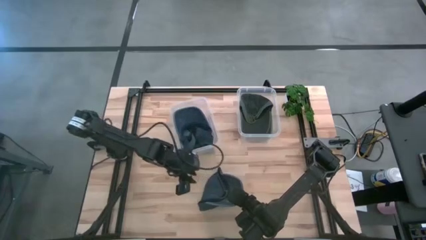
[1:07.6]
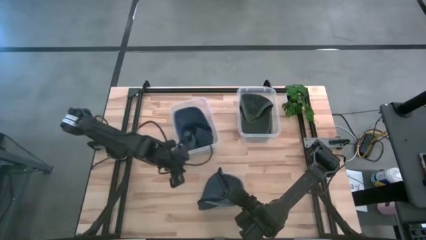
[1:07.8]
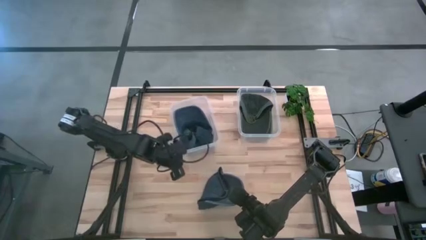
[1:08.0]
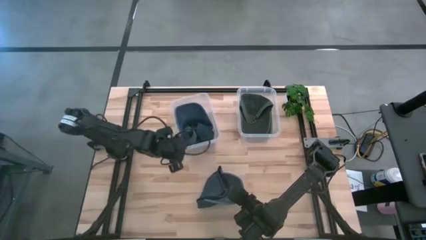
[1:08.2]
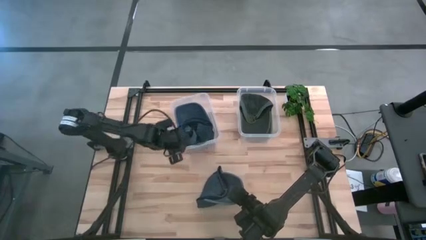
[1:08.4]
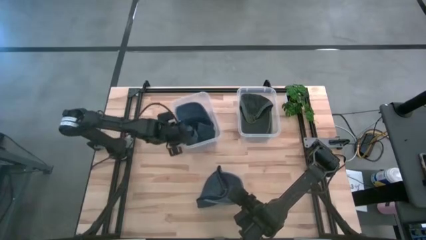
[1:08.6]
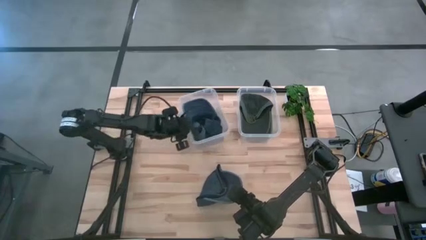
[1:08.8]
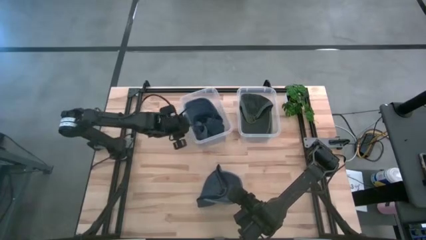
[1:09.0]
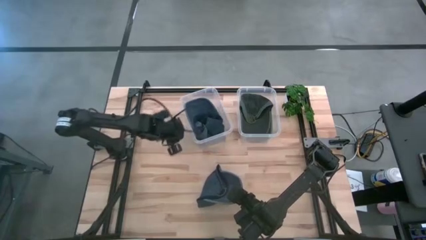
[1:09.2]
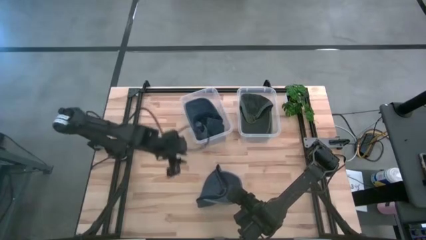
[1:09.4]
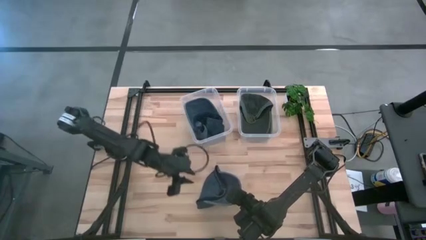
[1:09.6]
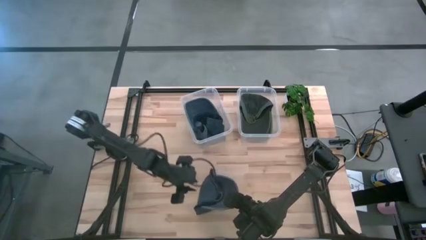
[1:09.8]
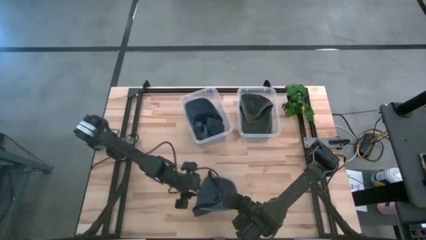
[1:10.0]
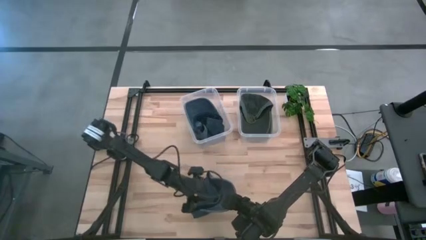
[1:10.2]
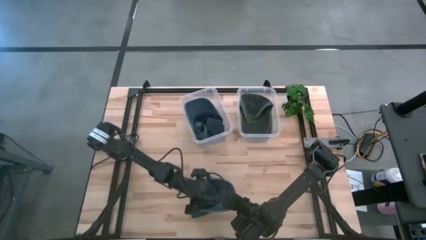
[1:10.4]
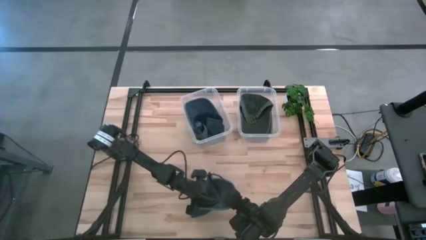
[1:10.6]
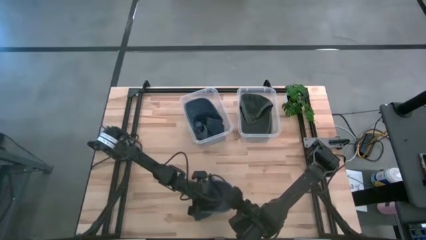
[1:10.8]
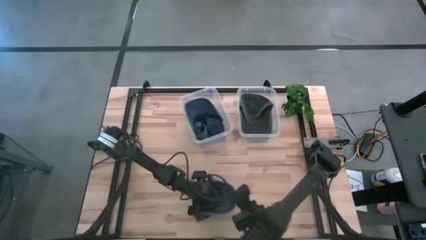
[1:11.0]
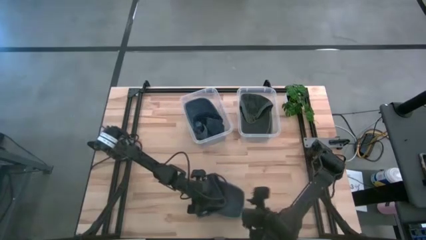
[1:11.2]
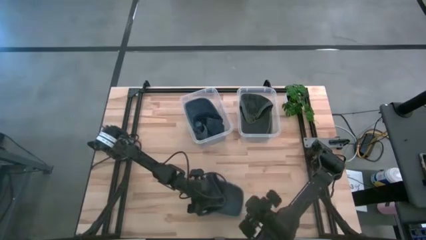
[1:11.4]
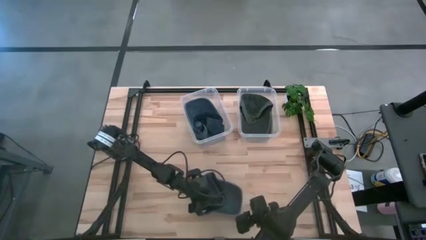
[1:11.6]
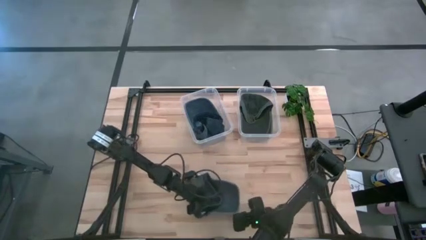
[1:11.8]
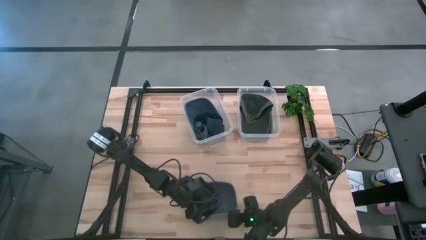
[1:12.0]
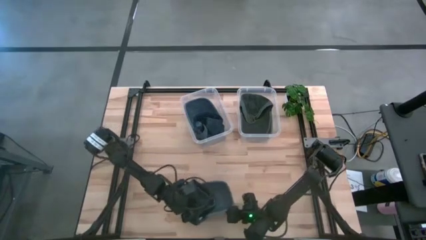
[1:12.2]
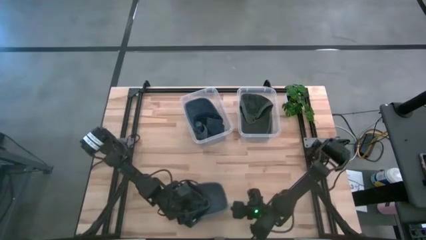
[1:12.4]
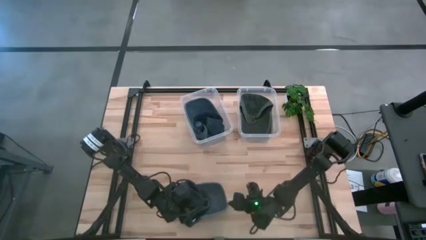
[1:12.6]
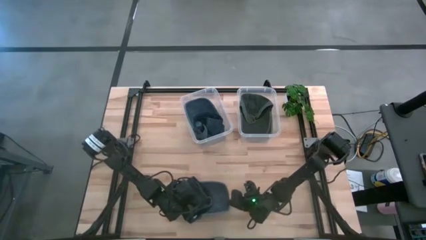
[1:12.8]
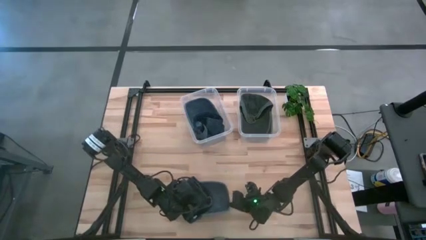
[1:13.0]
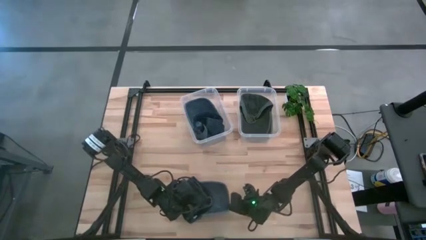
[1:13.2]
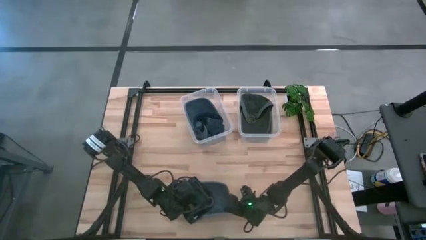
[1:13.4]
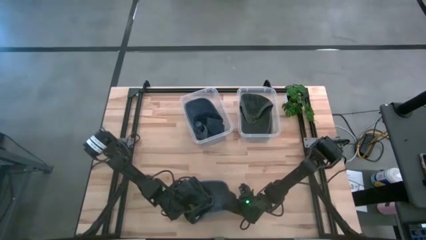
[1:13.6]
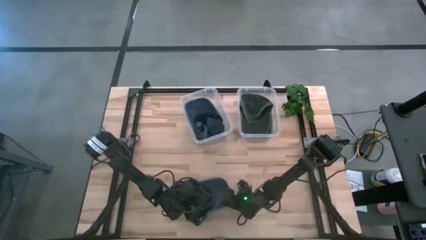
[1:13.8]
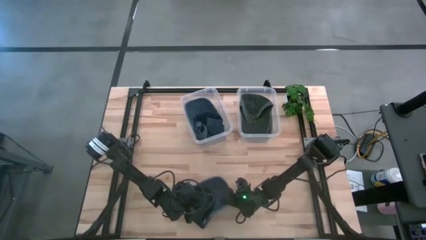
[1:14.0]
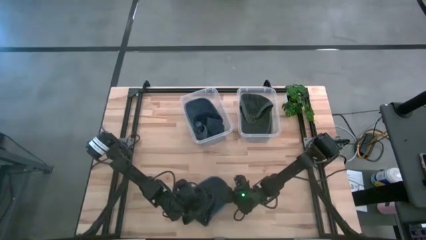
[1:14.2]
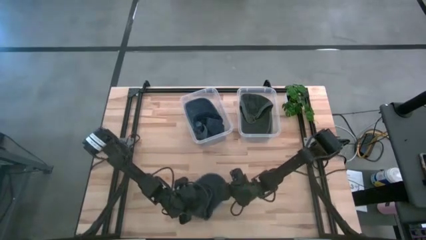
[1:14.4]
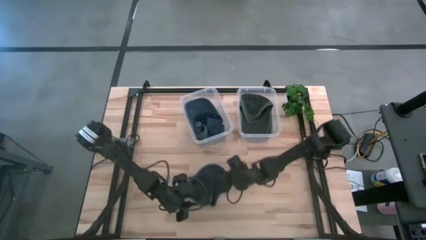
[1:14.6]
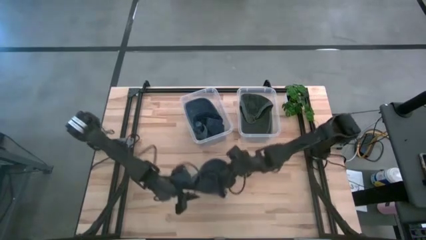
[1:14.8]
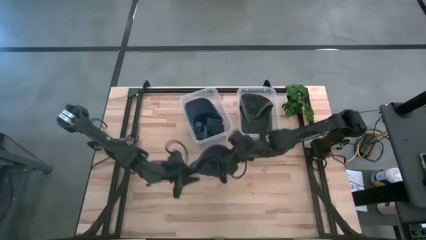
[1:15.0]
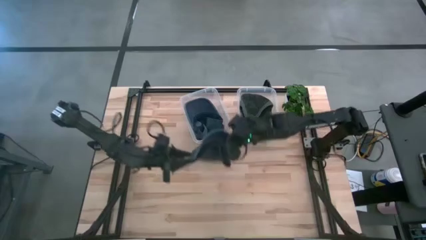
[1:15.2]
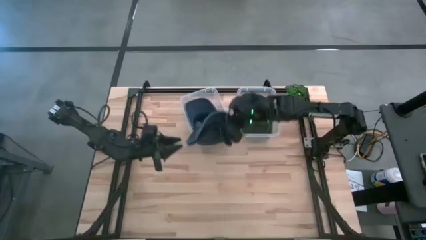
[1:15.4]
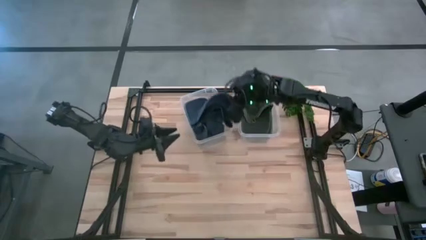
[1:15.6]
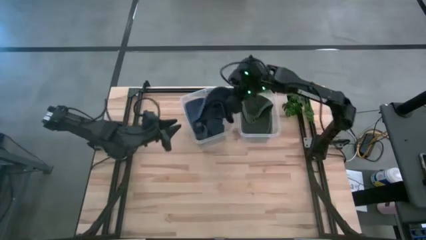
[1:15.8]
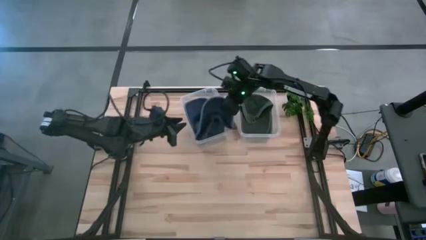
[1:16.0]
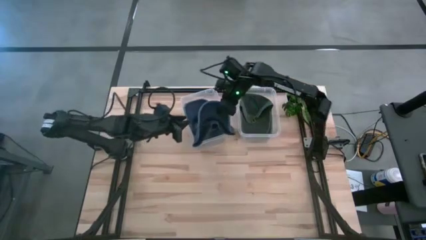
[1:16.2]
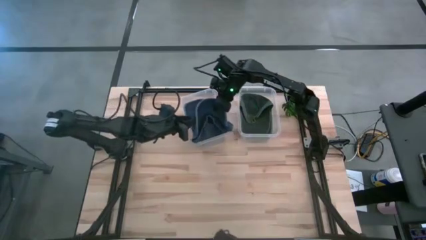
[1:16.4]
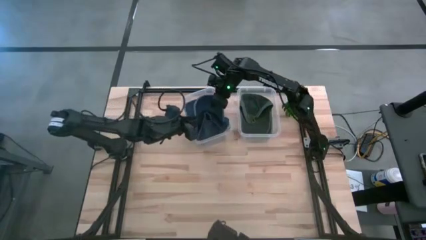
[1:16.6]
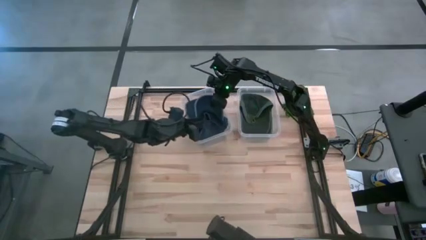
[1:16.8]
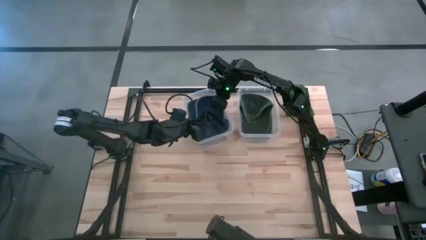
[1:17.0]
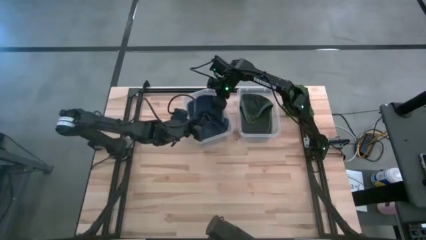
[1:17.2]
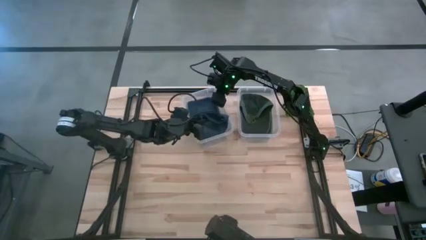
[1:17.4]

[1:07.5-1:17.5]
Task: Pick & Place hat
Put the blue cap into the left transparent bin

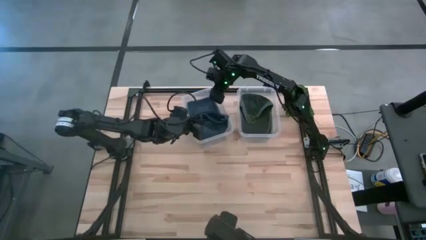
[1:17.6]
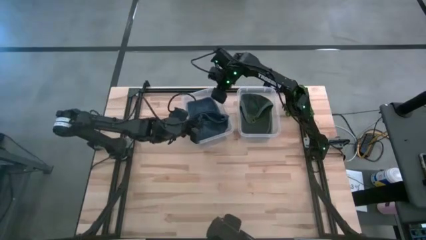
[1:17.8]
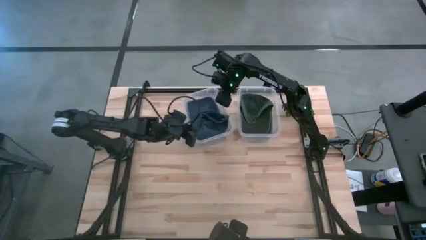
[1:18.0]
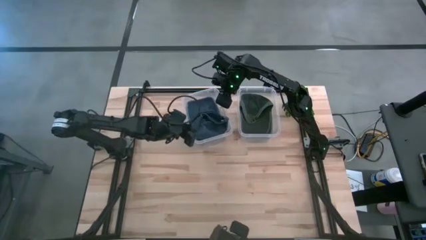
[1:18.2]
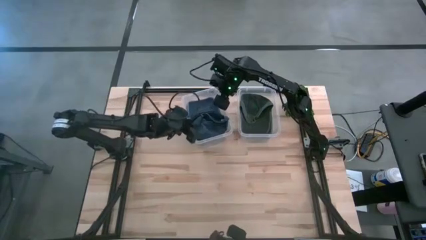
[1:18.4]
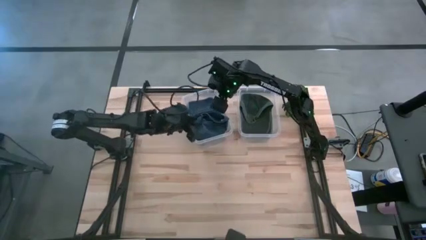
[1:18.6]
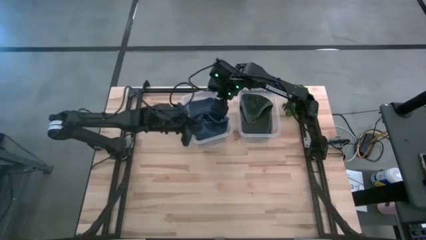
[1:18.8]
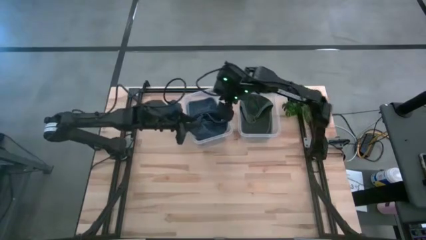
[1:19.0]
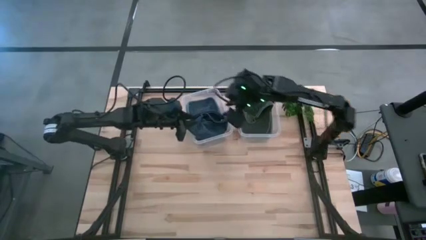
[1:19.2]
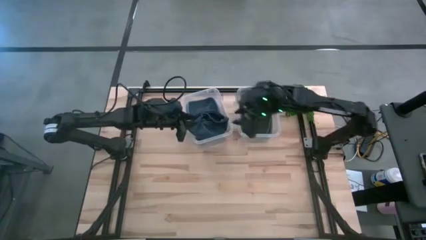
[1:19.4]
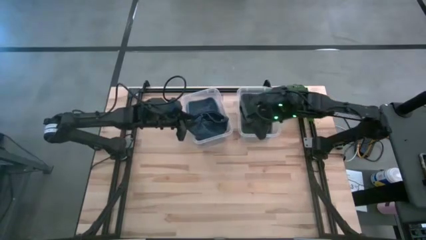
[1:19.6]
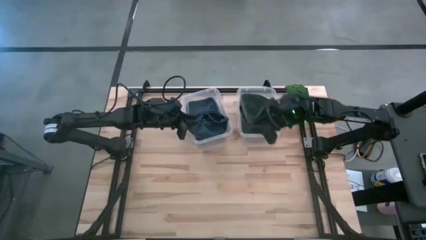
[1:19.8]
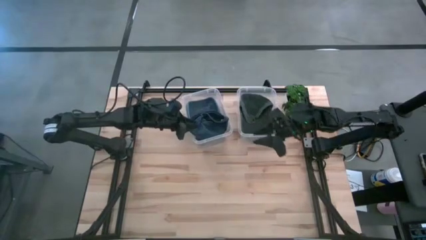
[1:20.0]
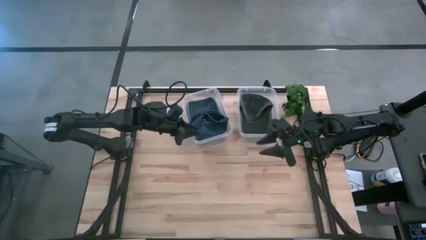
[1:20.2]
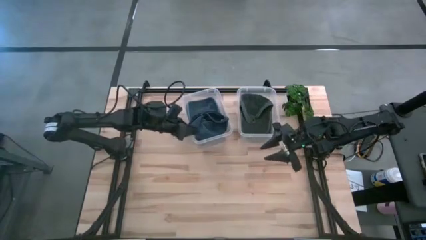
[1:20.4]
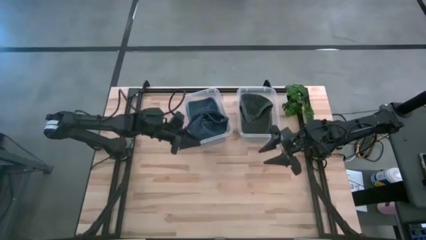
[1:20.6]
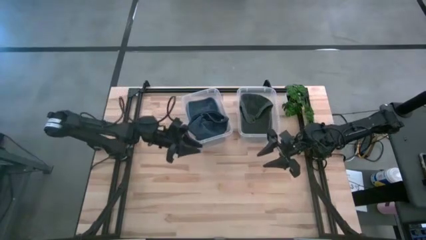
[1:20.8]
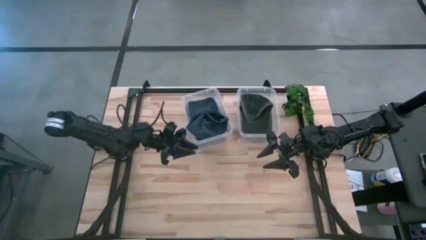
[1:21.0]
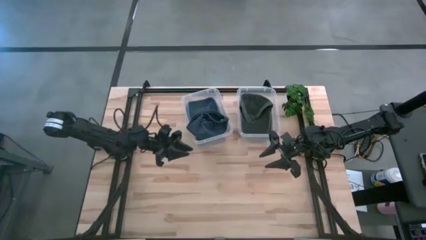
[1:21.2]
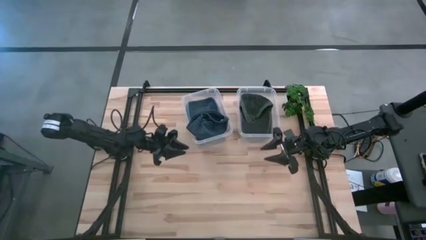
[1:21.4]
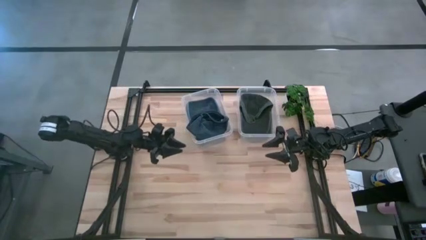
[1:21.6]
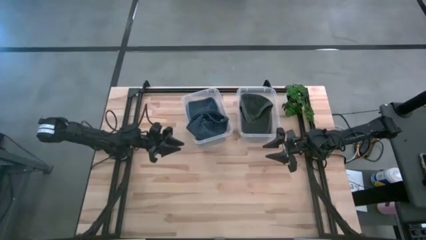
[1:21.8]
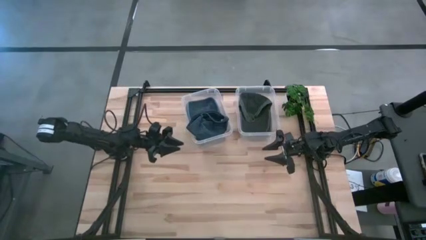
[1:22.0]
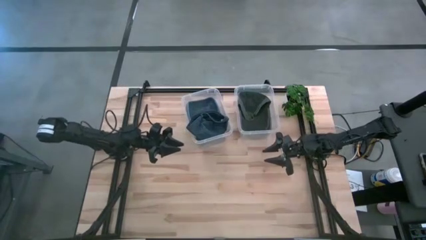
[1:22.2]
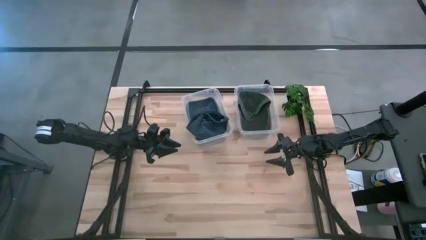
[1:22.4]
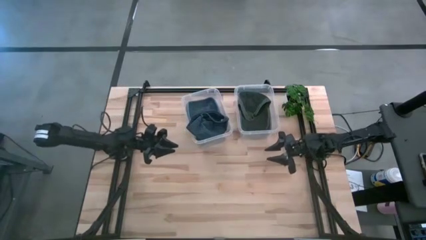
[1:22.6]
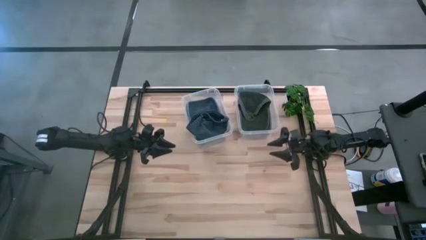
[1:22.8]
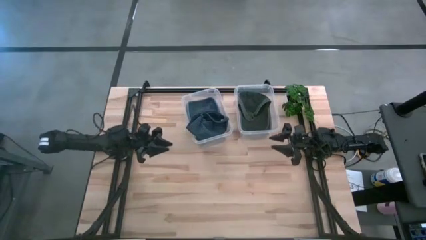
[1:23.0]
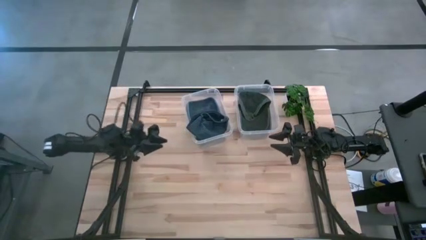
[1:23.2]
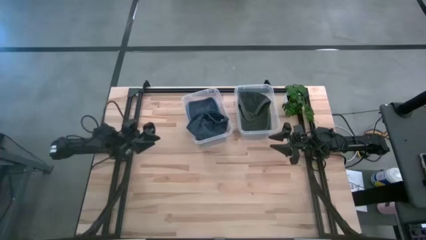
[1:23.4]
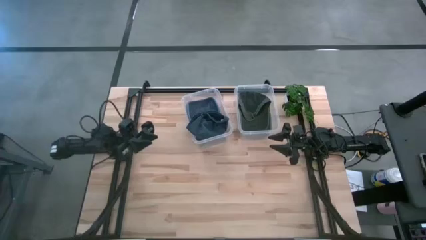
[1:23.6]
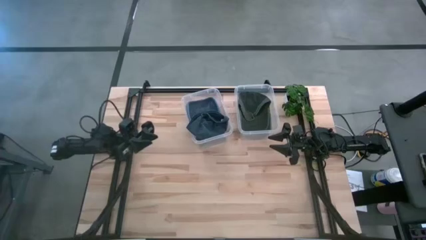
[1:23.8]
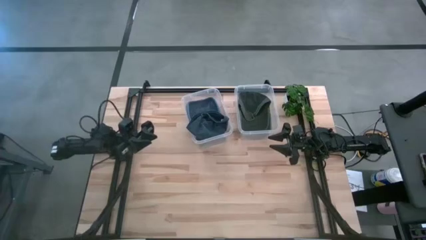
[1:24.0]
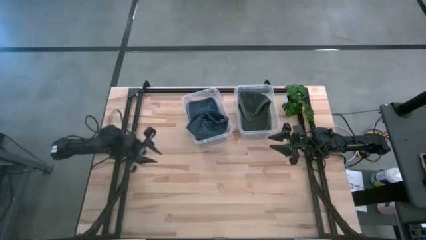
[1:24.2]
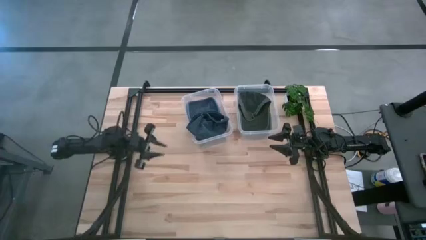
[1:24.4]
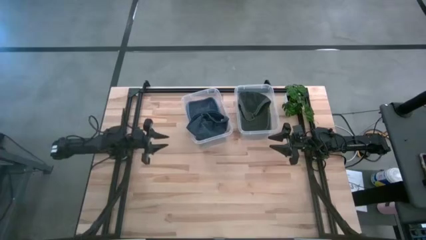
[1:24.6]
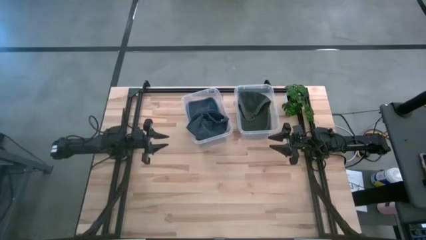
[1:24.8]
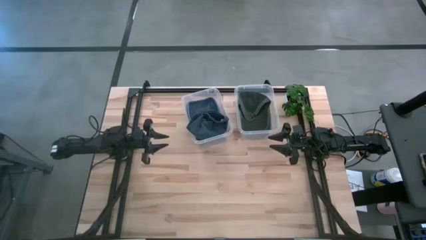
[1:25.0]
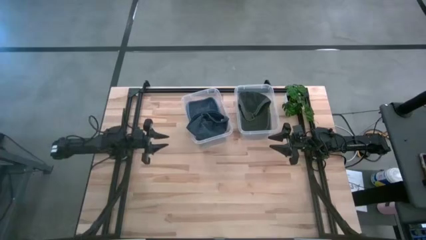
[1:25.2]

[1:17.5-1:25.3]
Return to Home Position
